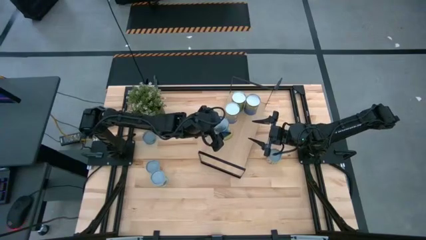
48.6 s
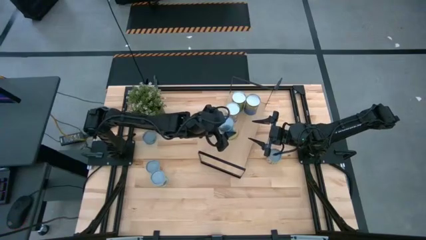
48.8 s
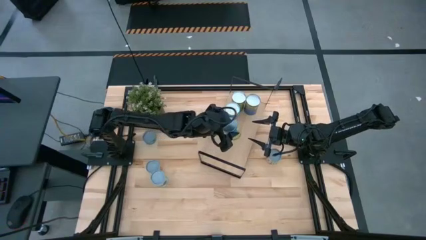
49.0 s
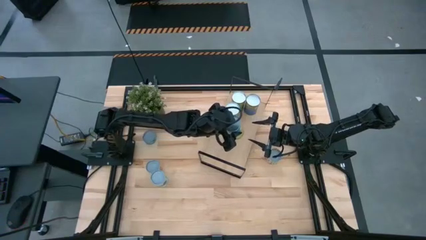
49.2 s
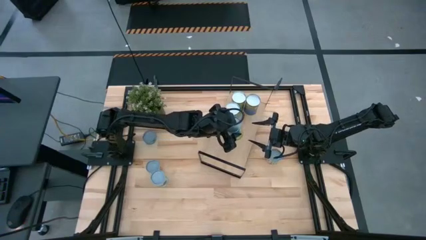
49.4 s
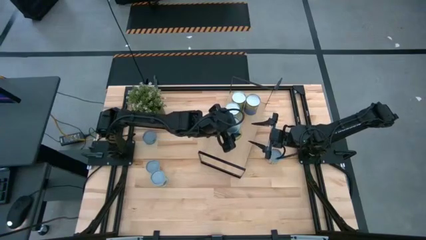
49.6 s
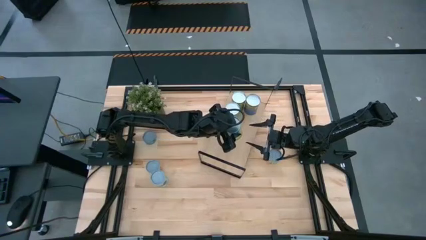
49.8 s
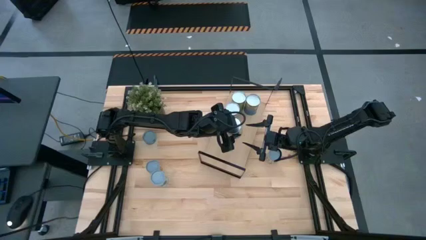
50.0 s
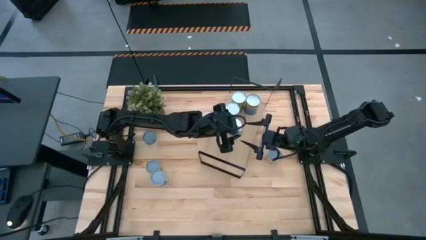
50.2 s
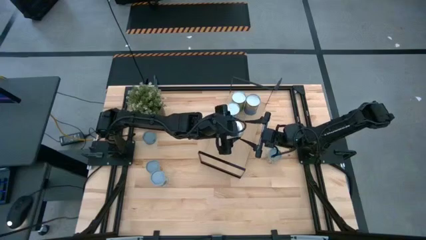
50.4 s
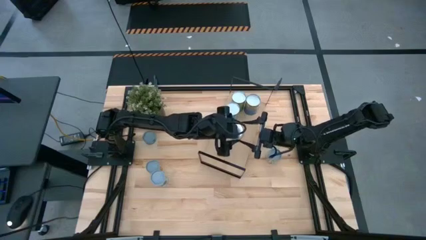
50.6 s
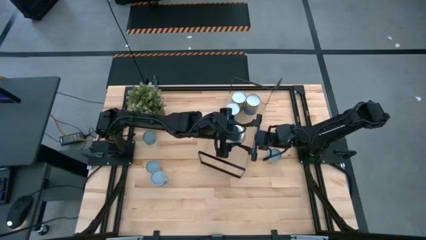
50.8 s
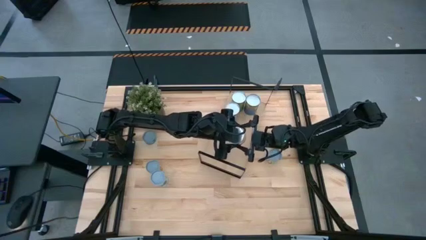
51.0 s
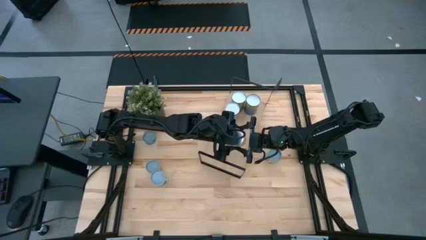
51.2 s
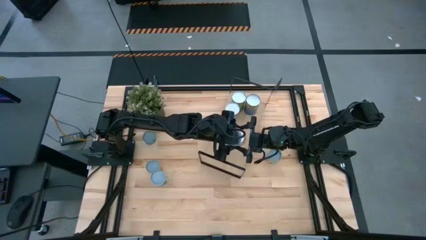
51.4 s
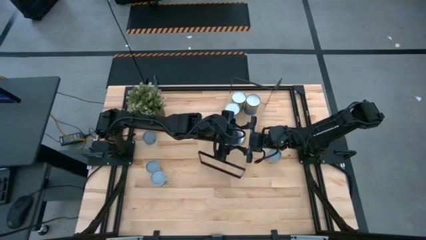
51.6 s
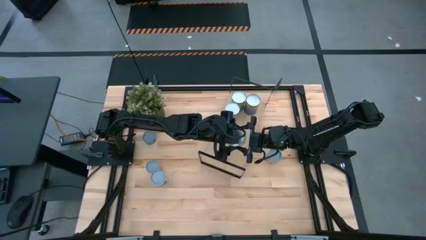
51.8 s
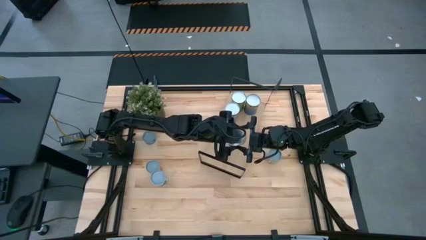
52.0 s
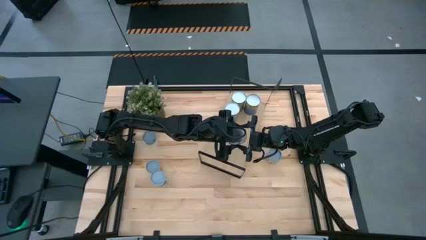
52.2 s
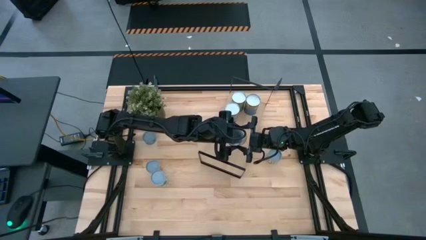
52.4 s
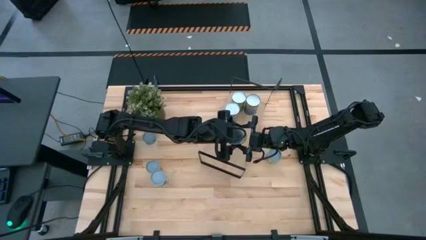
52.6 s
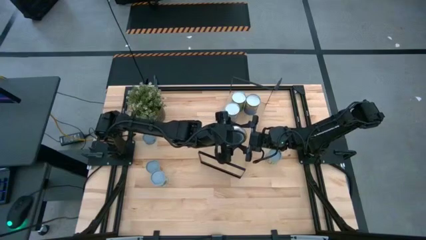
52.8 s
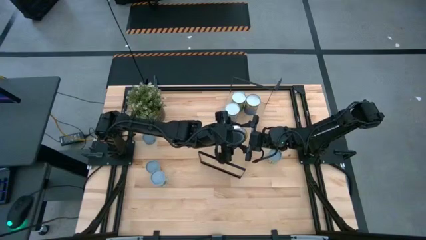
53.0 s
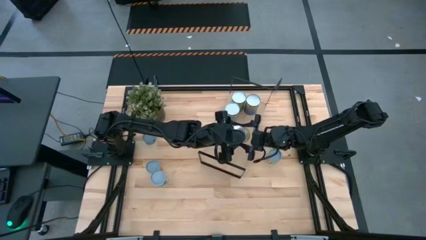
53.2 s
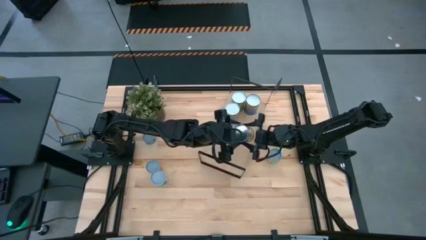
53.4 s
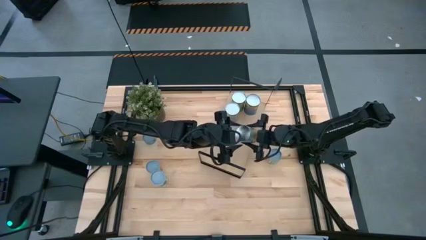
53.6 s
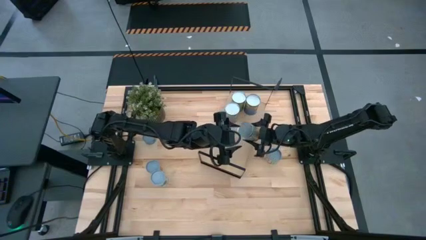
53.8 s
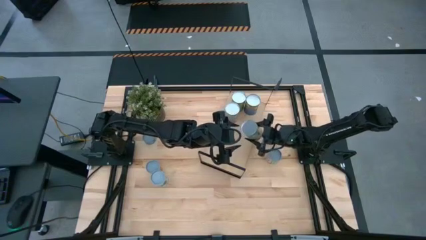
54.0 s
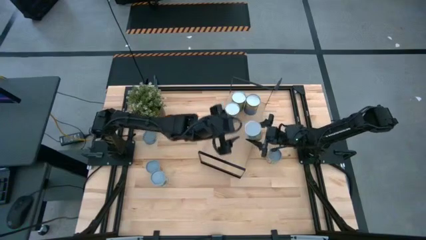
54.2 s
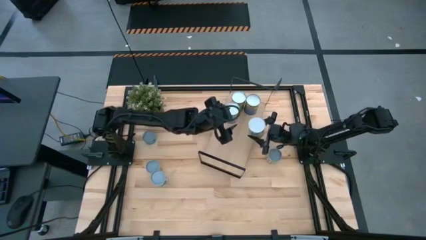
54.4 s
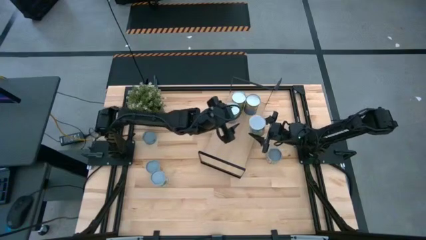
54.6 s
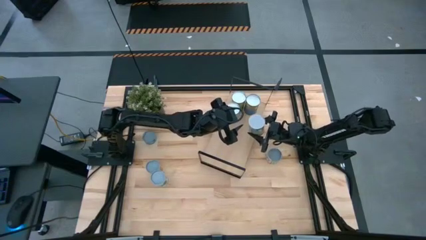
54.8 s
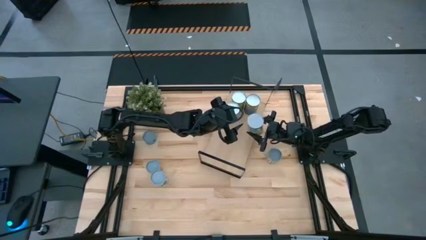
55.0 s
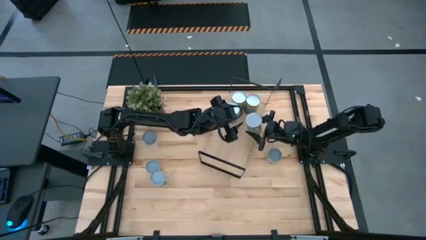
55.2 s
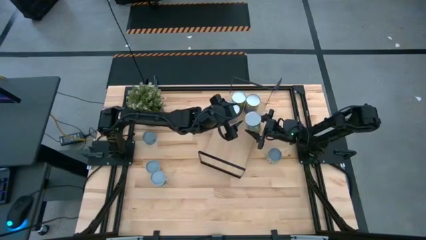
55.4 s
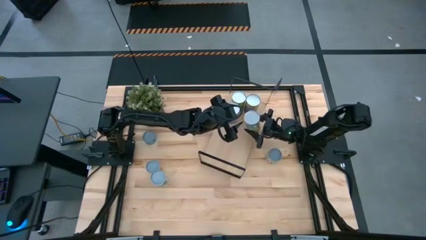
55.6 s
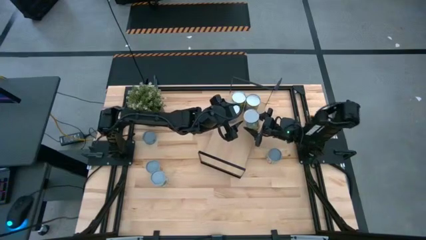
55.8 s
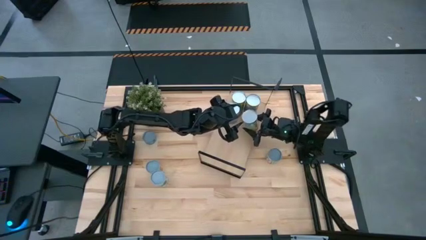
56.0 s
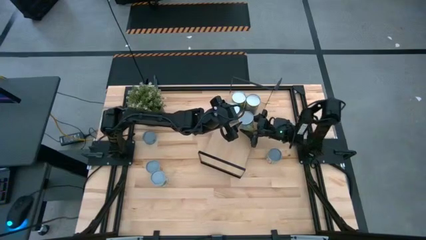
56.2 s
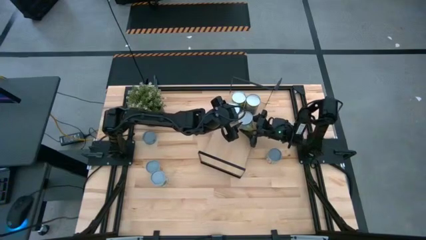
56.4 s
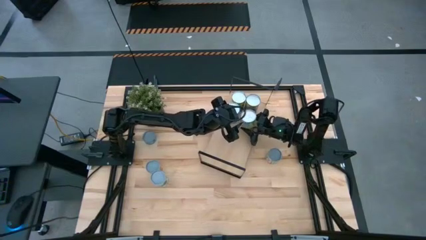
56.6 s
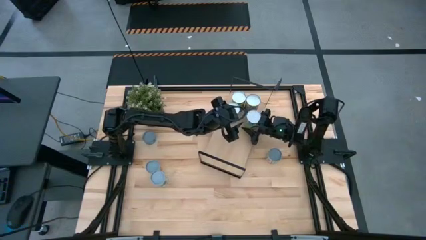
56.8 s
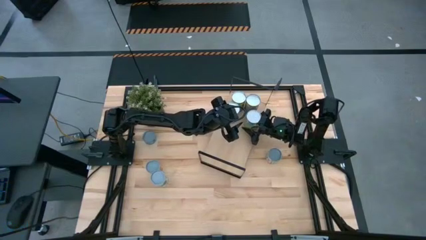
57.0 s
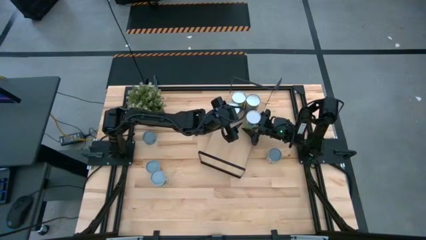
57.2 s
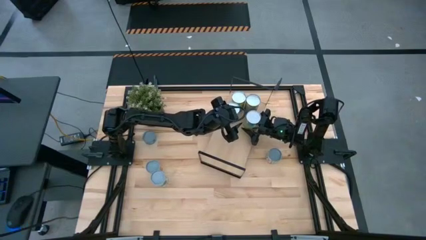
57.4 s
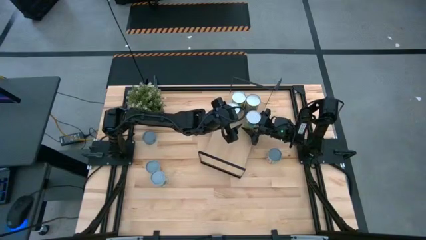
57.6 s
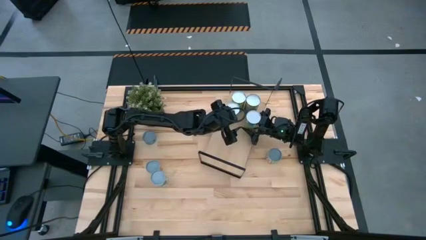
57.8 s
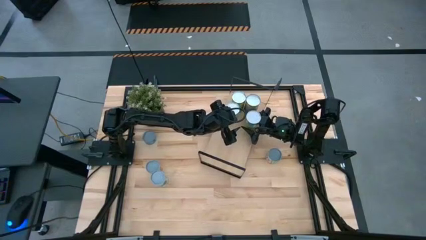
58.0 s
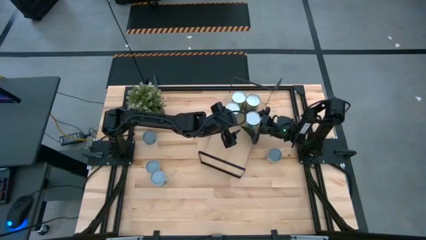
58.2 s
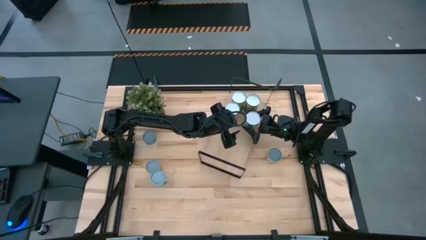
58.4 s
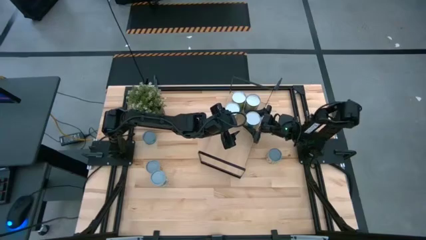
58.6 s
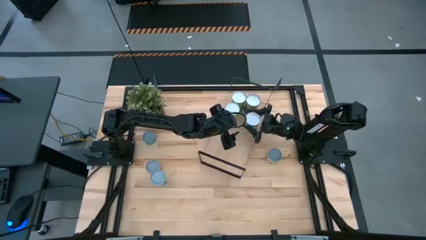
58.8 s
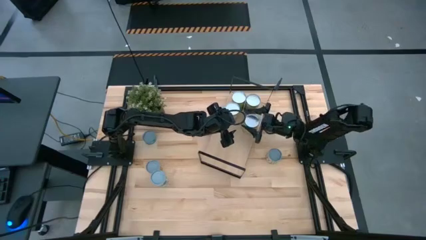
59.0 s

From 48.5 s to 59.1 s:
Task: Pick and place cans onto a shelf
Put the canned carrots on the shelf

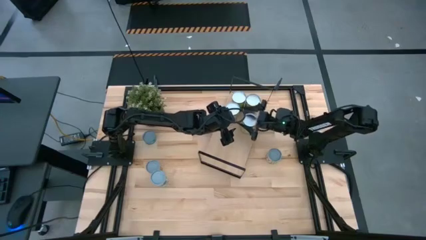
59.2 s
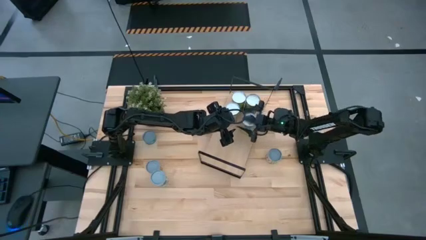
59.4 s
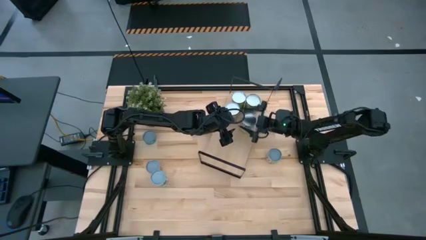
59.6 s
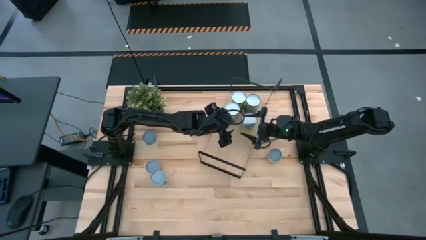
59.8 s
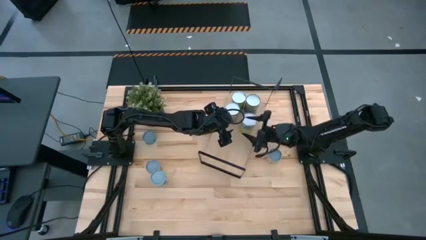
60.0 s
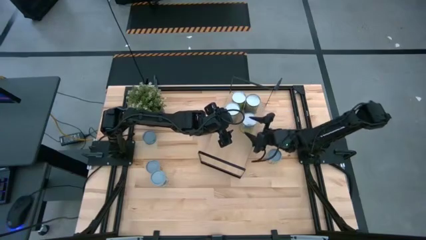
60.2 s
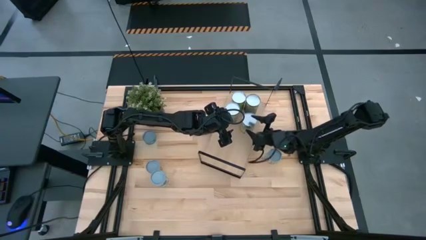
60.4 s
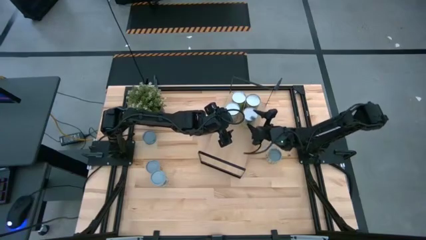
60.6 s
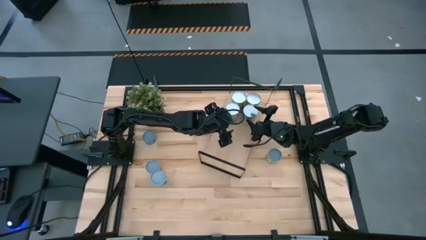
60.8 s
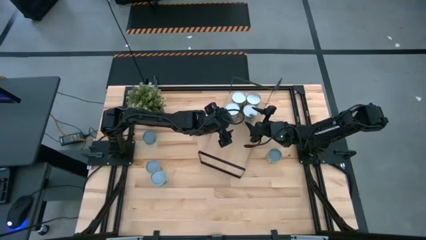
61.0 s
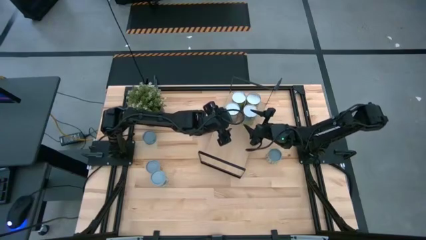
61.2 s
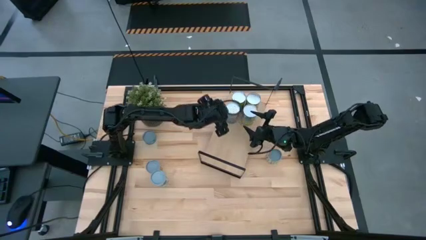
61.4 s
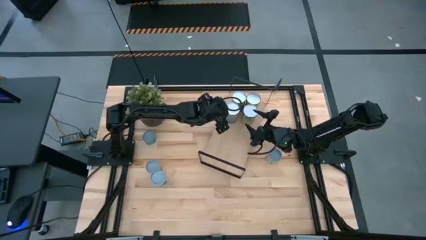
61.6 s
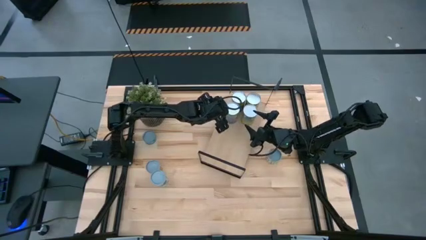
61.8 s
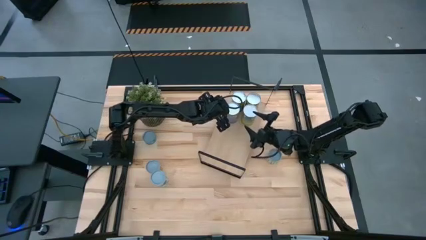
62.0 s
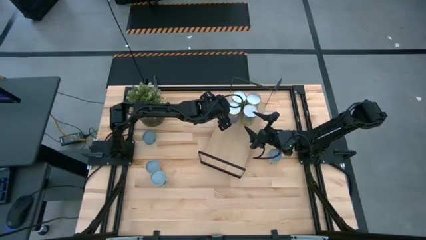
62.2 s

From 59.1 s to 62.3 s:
Adjust the canned carrots and the canned peaches on the shelf
